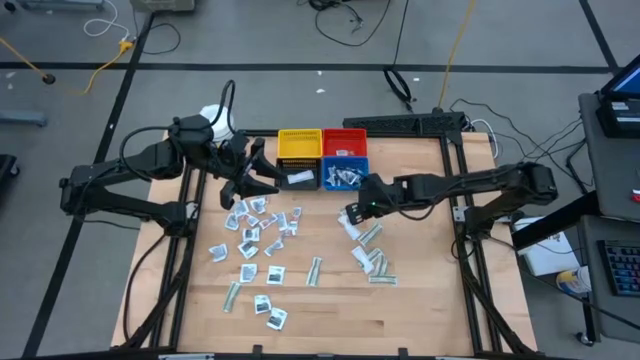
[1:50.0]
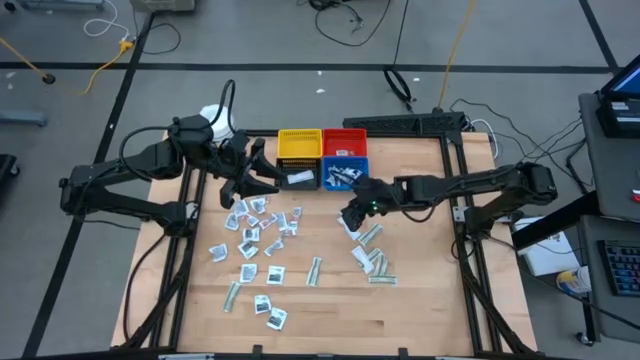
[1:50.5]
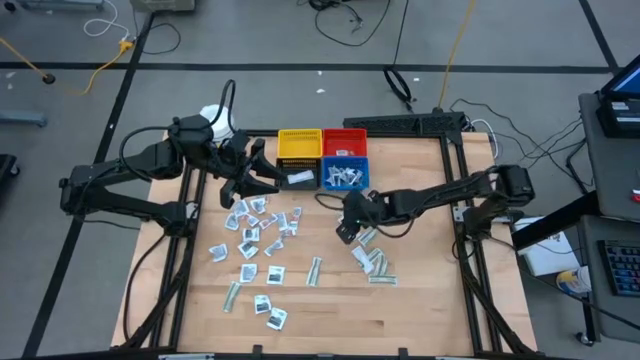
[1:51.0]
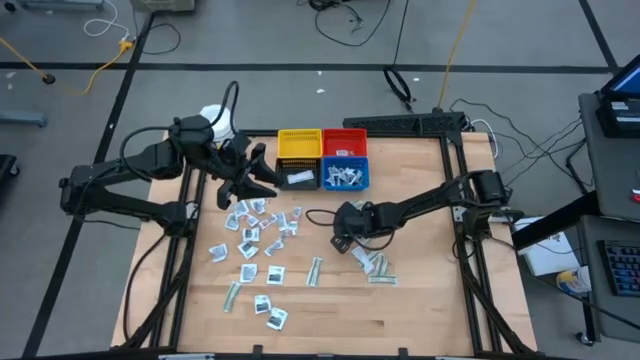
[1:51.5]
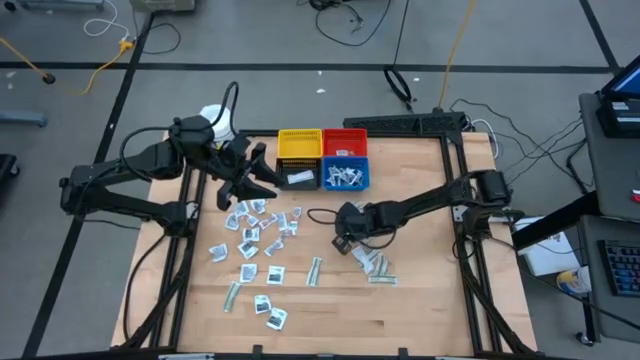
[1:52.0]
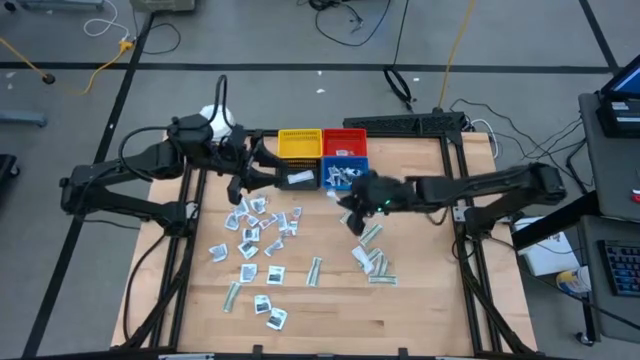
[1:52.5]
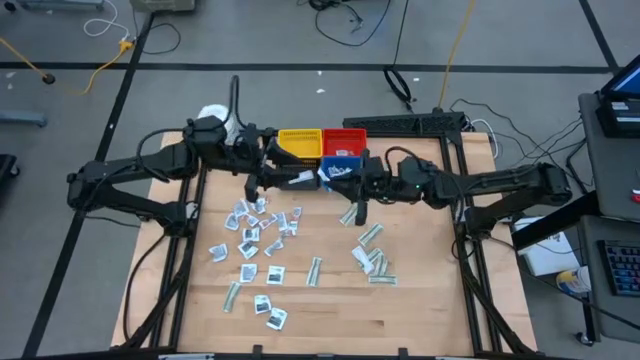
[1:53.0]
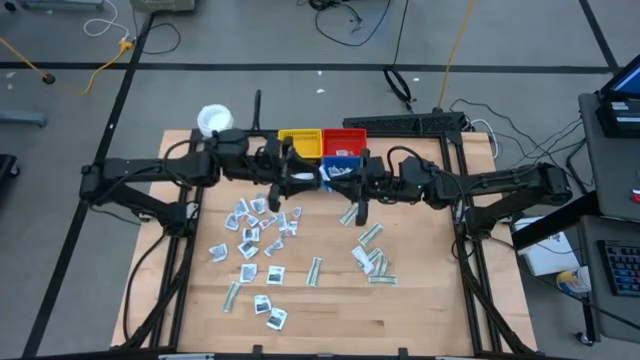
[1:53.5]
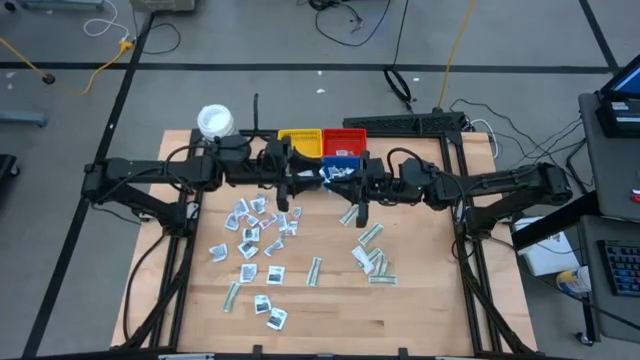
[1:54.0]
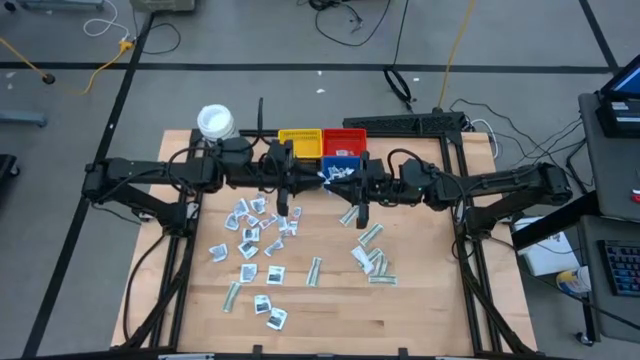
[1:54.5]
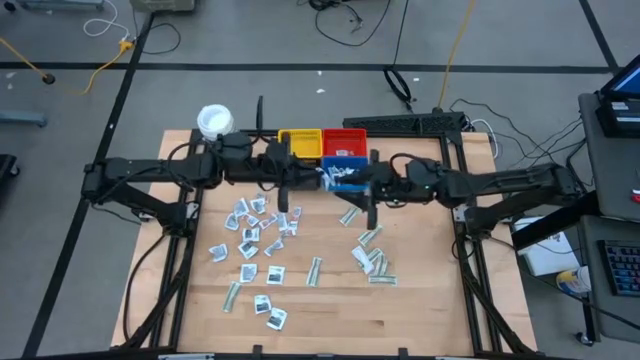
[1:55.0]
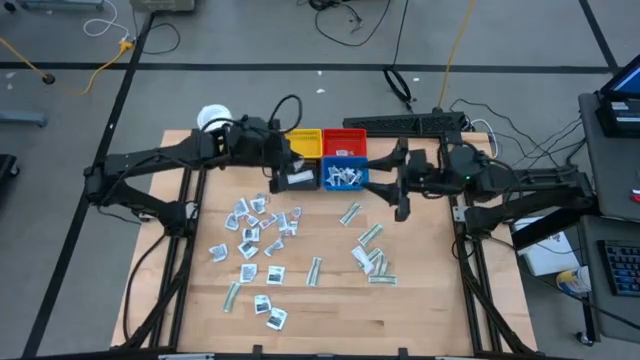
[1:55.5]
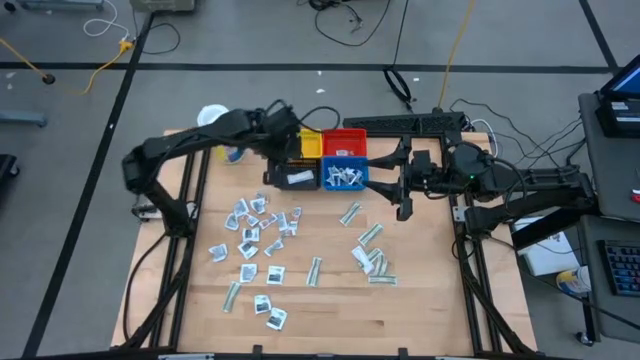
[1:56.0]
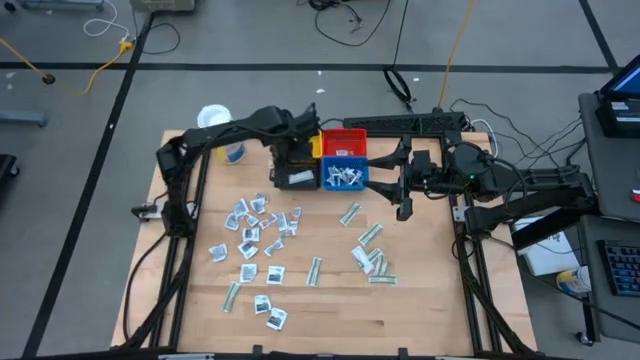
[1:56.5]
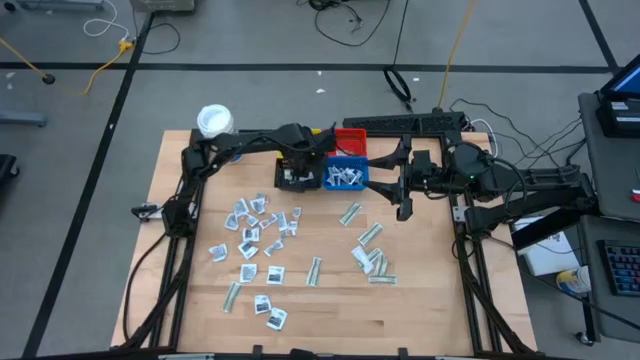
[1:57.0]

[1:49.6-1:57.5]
Task: Pick & Place First Aid Supplies
Put the green bandage pack into the black basket

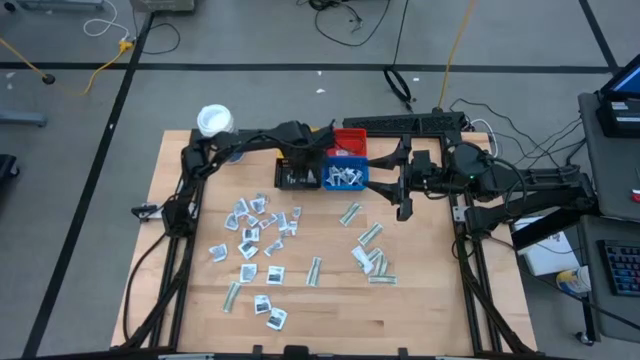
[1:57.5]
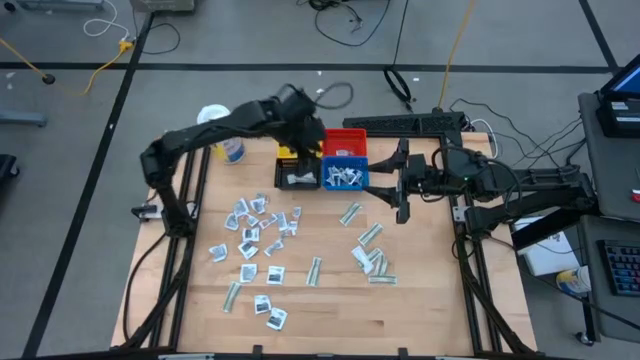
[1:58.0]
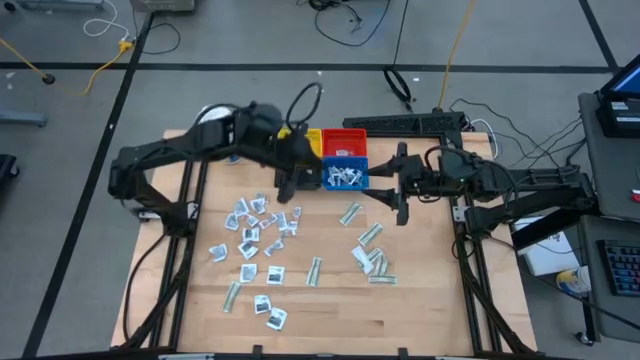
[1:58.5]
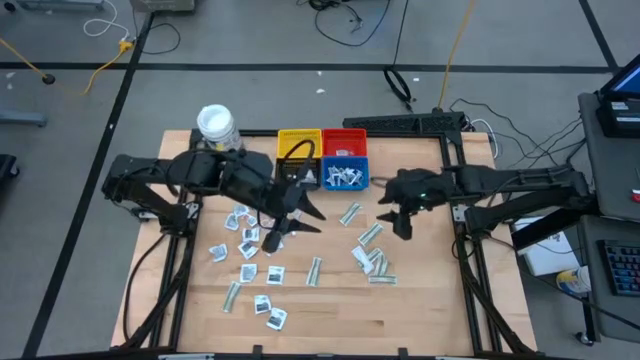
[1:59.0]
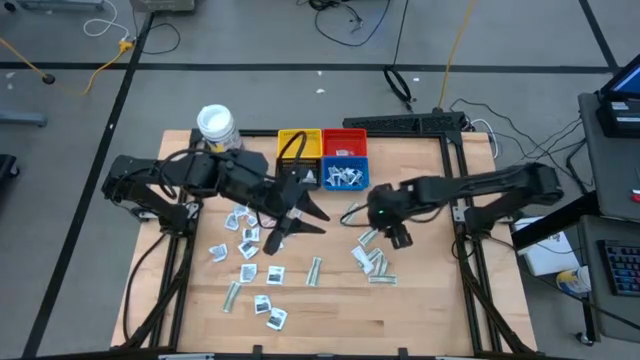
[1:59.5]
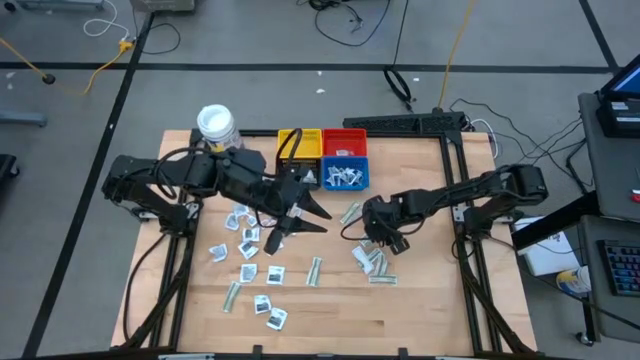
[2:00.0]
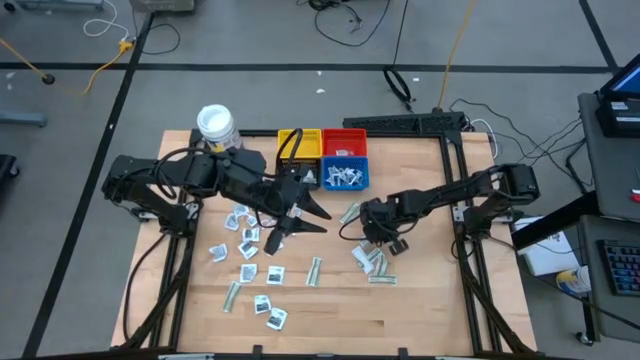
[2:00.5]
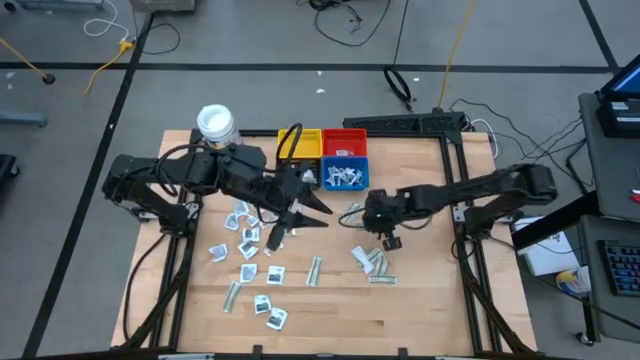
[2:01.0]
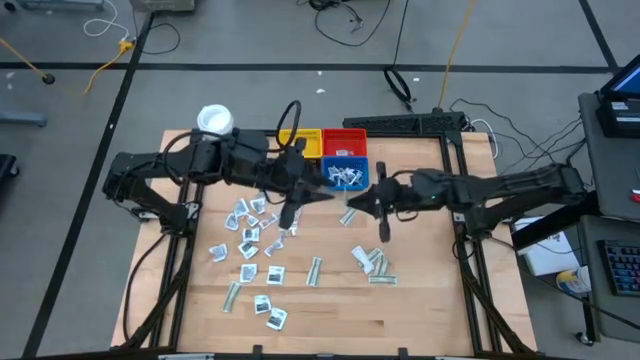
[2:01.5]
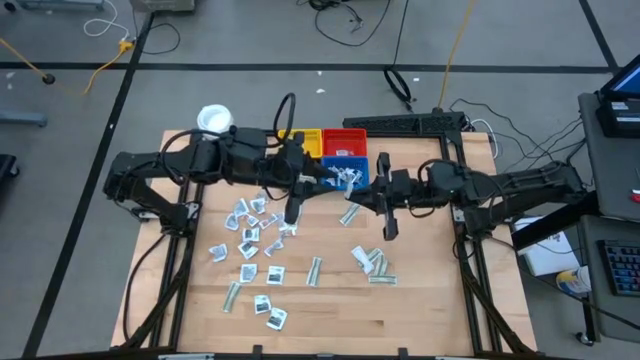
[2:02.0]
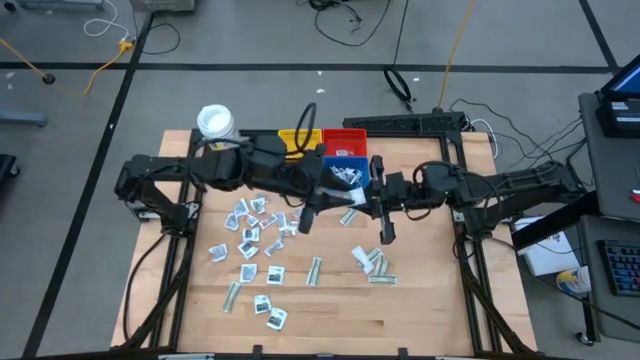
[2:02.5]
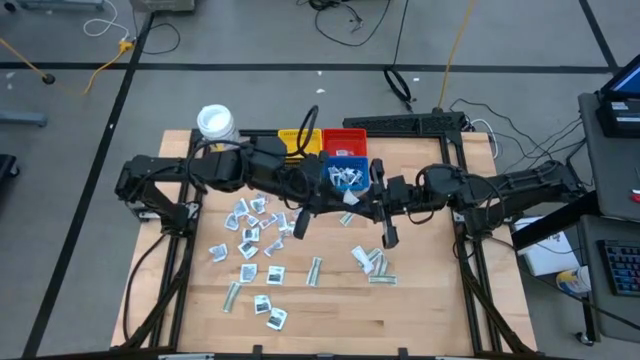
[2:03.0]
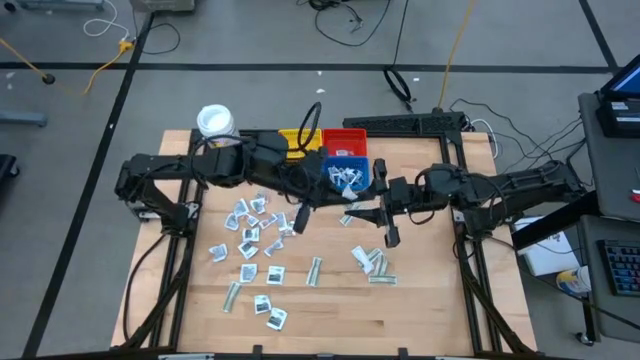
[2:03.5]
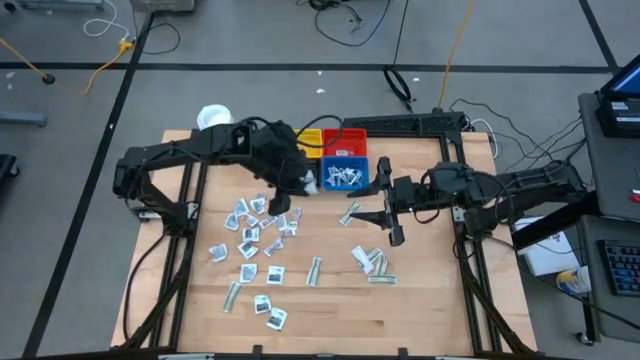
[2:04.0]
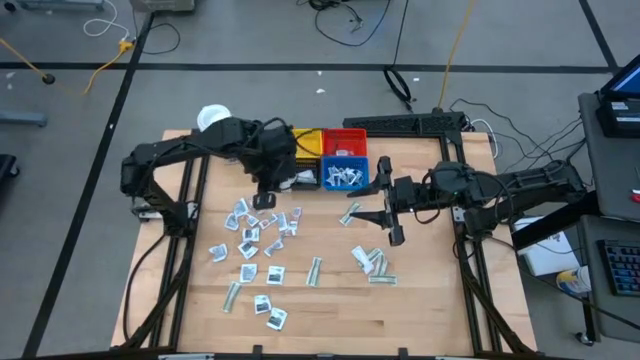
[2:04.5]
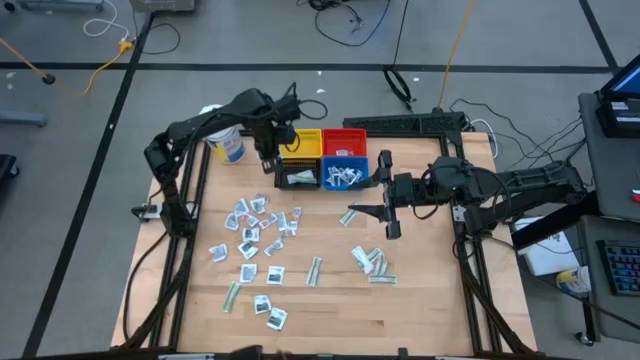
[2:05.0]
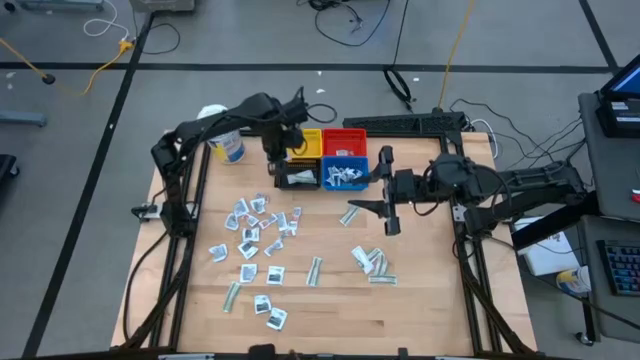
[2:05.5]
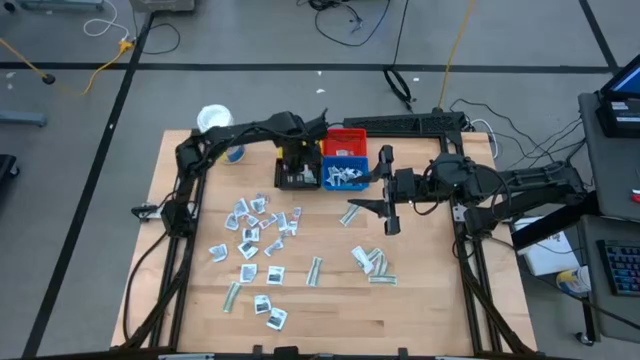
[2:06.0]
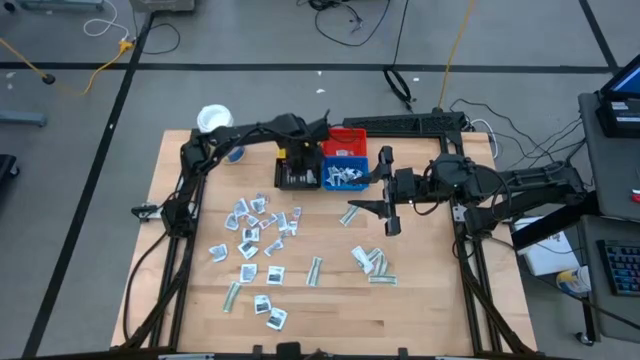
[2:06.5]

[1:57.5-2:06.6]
Put the green bandage pack into the black basket

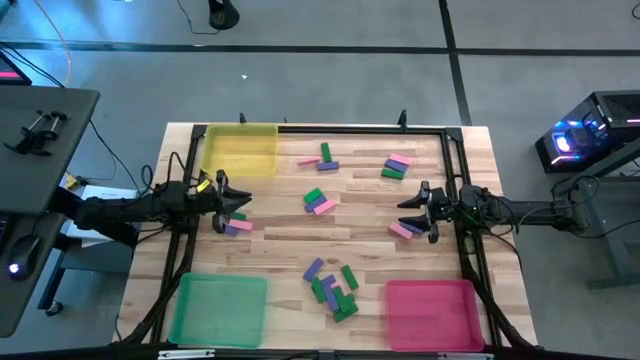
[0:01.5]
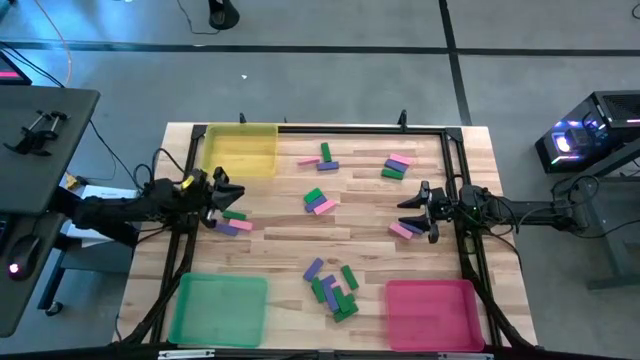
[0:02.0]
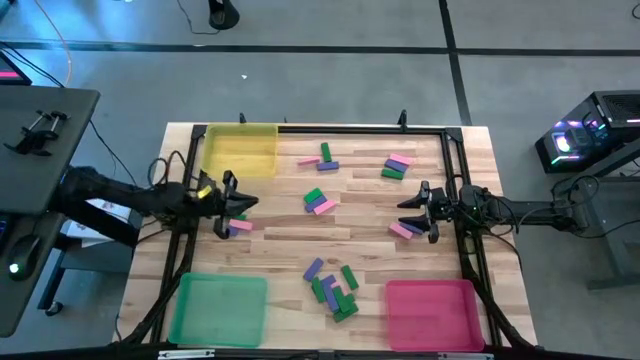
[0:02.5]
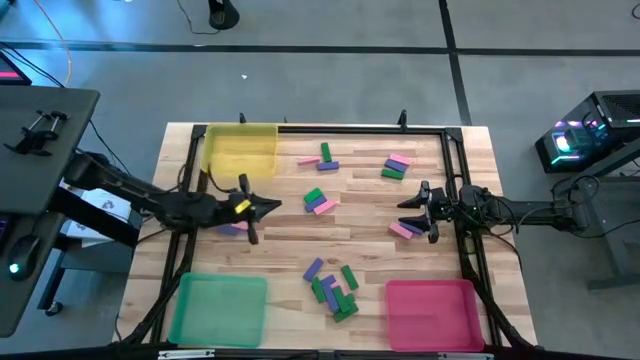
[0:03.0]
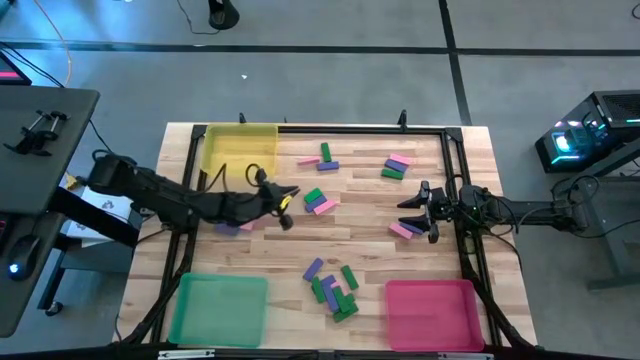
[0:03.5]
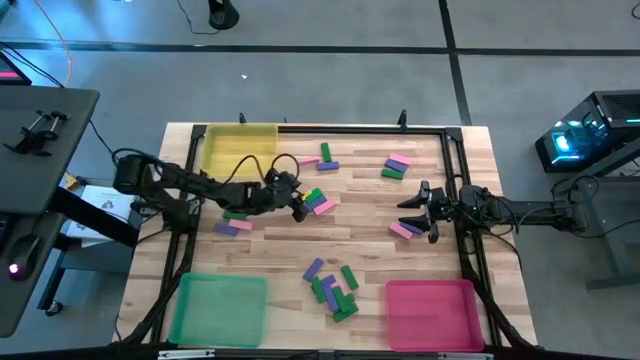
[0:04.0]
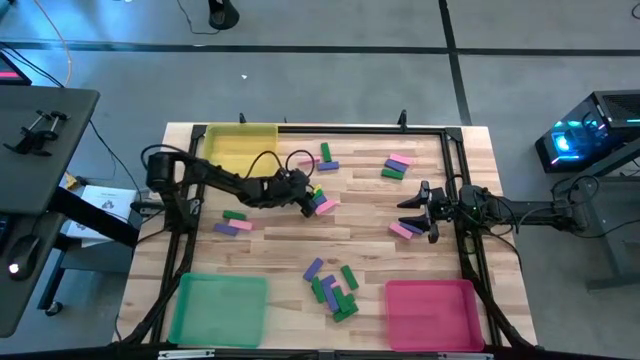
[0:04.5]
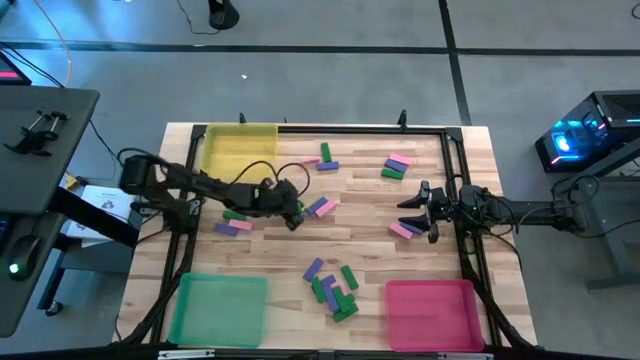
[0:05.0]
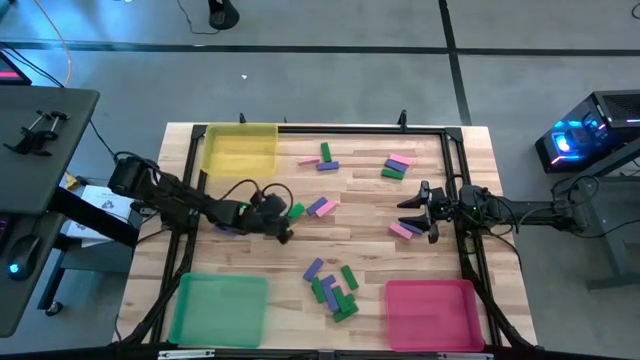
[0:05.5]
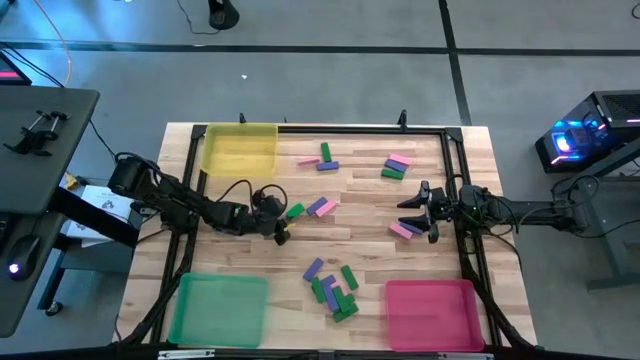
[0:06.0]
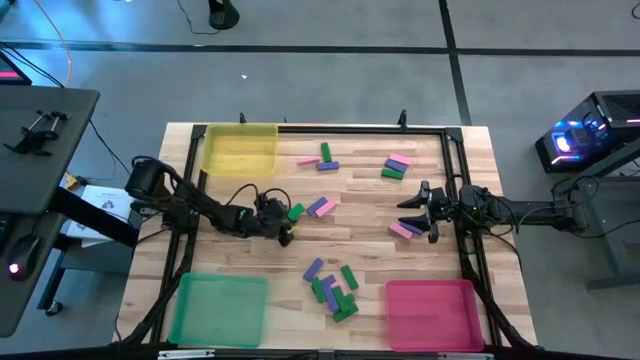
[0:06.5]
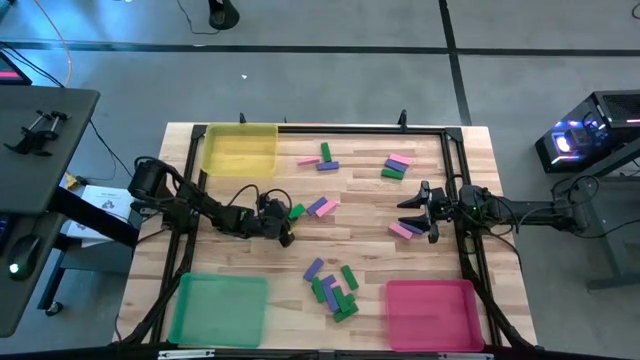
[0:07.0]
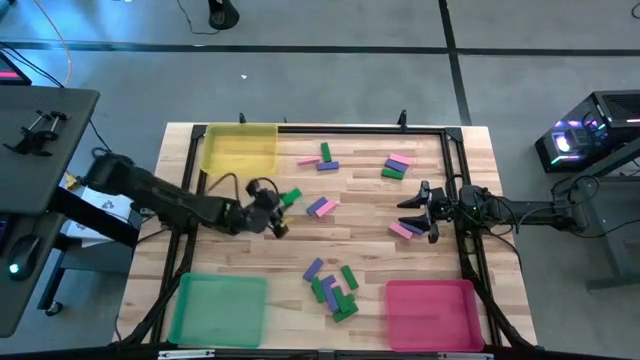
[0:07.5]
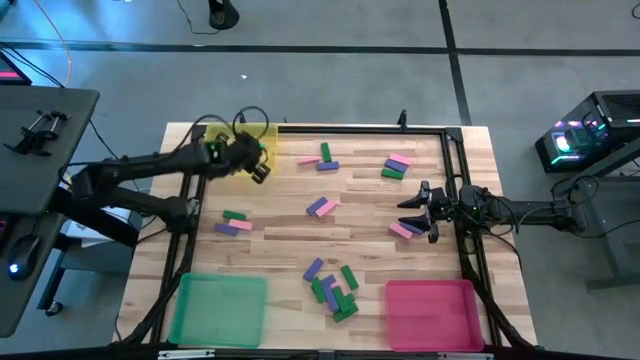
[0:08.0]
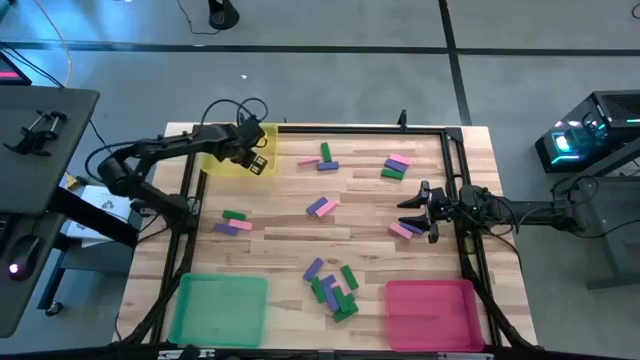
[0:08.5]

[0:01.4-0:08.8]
Task: Sort blocks
Put the green block into the yellow bin
